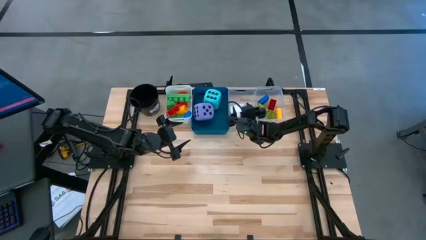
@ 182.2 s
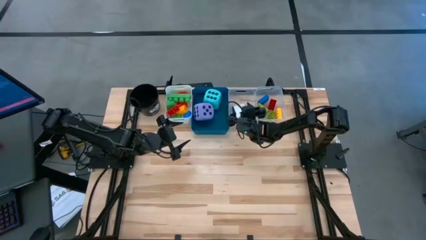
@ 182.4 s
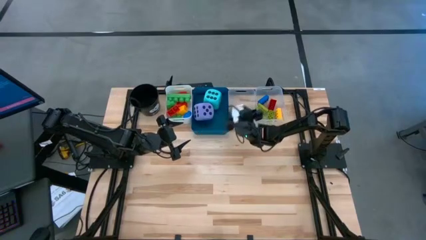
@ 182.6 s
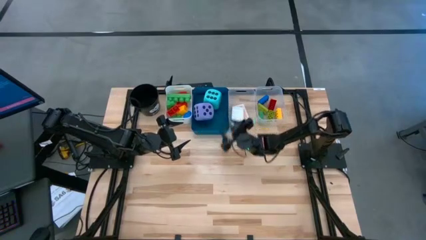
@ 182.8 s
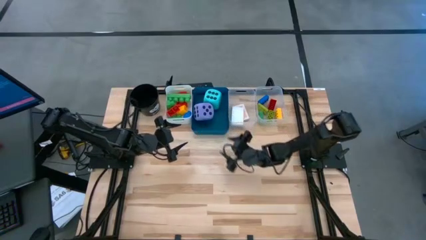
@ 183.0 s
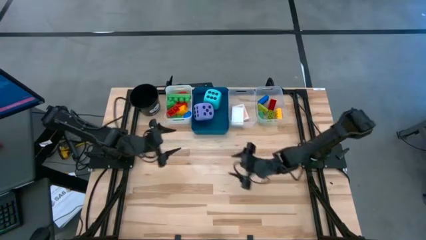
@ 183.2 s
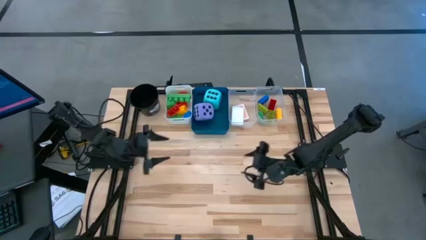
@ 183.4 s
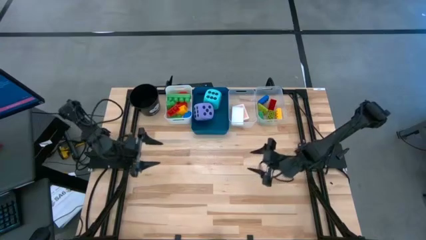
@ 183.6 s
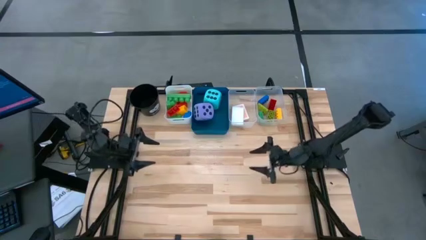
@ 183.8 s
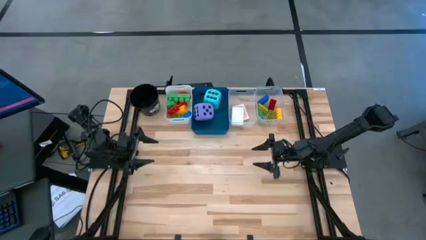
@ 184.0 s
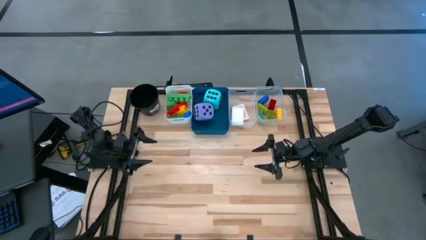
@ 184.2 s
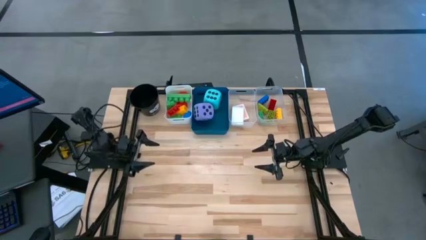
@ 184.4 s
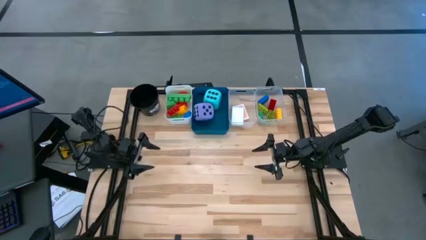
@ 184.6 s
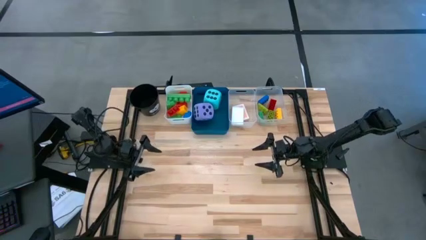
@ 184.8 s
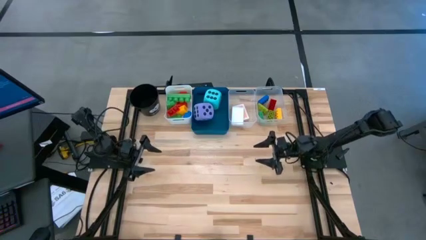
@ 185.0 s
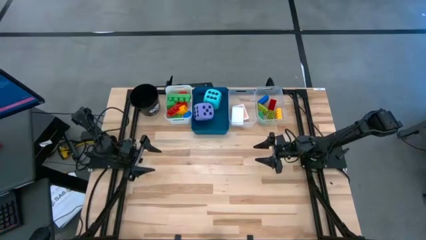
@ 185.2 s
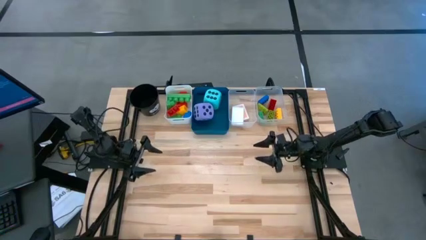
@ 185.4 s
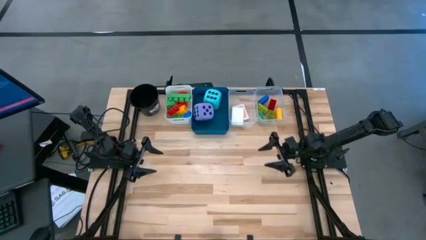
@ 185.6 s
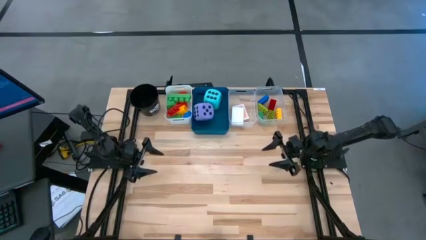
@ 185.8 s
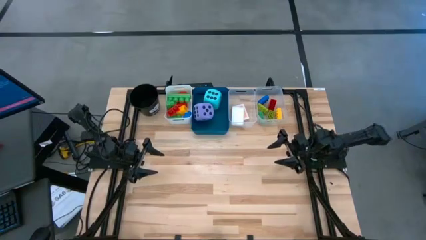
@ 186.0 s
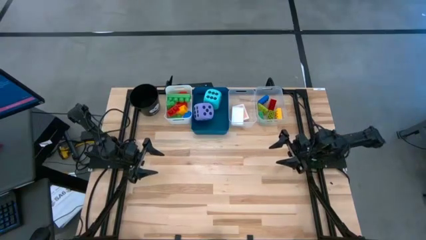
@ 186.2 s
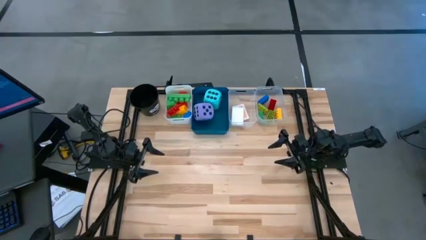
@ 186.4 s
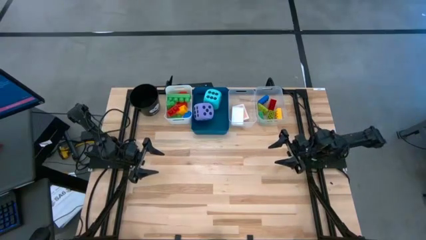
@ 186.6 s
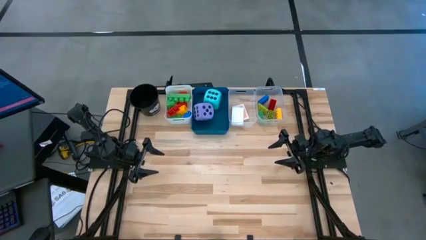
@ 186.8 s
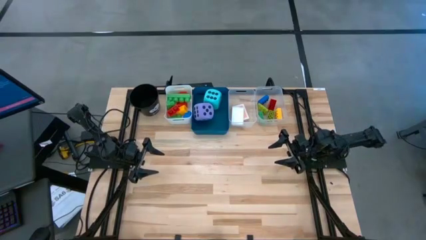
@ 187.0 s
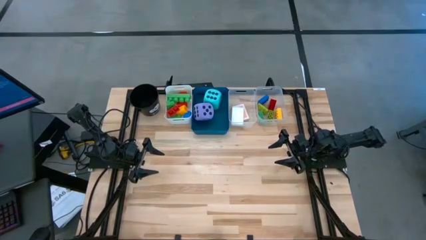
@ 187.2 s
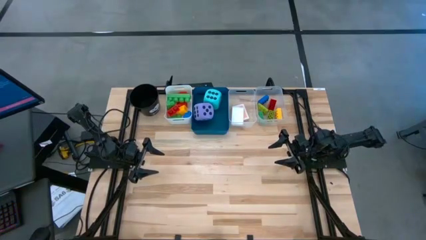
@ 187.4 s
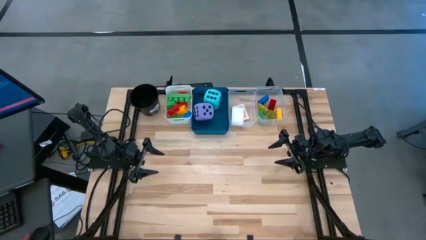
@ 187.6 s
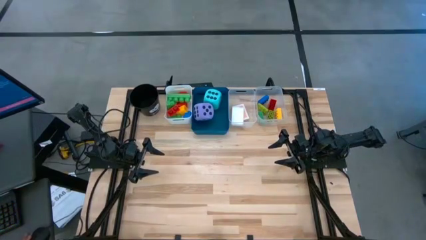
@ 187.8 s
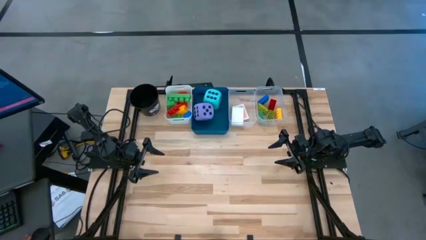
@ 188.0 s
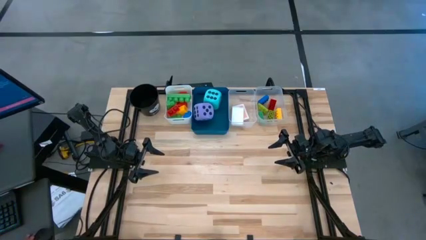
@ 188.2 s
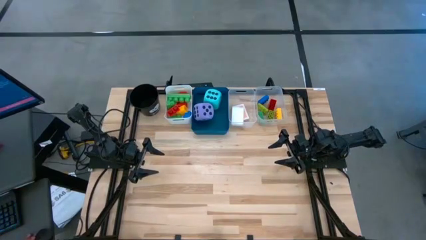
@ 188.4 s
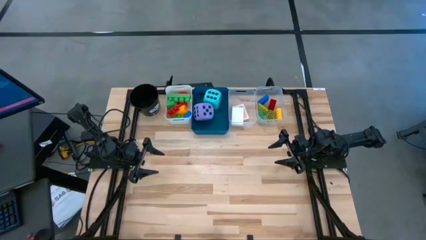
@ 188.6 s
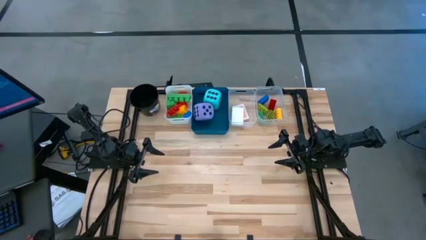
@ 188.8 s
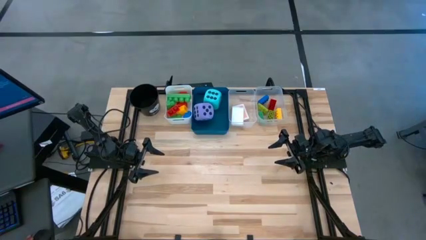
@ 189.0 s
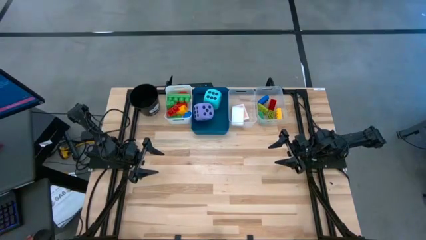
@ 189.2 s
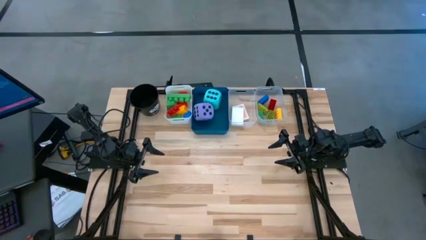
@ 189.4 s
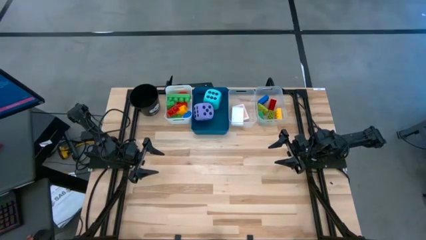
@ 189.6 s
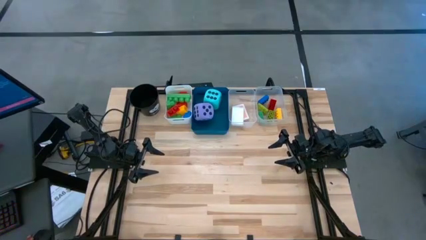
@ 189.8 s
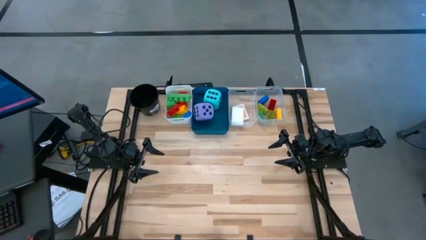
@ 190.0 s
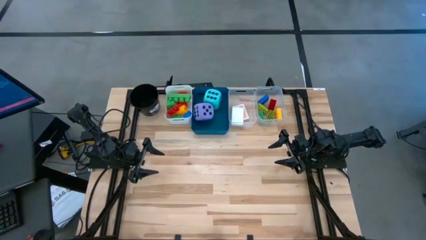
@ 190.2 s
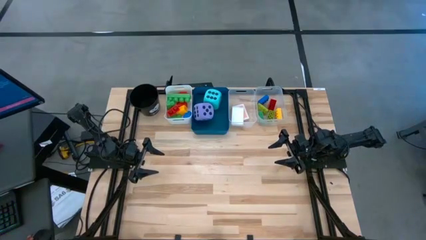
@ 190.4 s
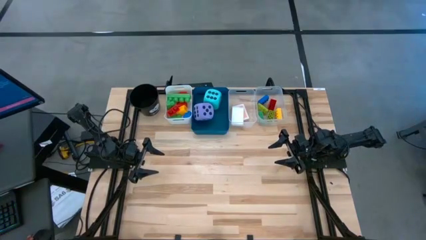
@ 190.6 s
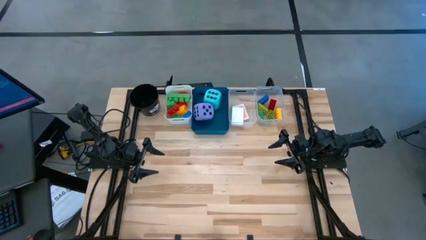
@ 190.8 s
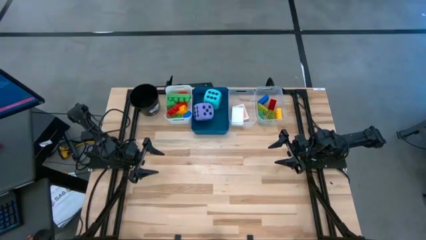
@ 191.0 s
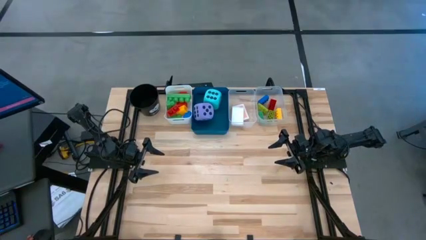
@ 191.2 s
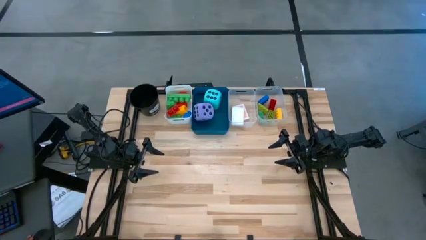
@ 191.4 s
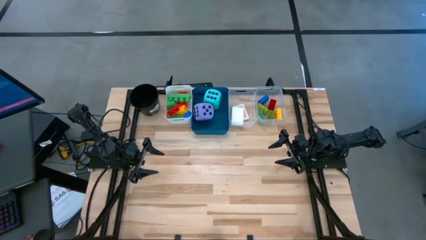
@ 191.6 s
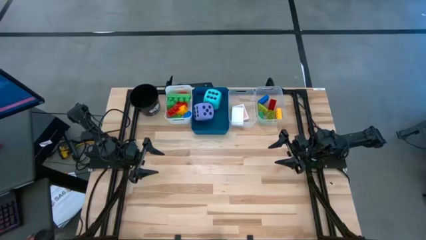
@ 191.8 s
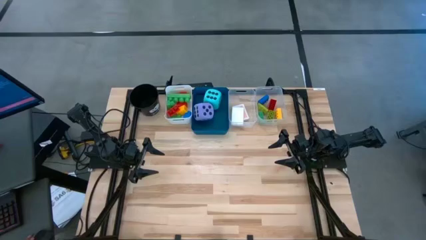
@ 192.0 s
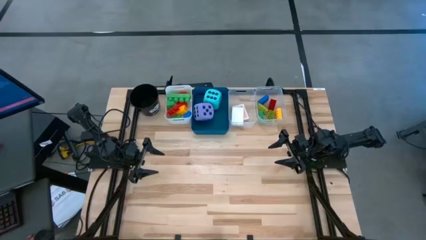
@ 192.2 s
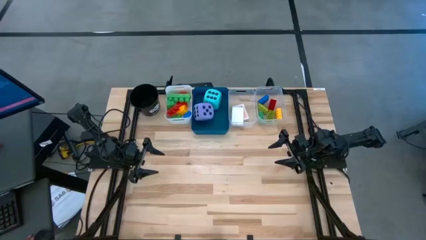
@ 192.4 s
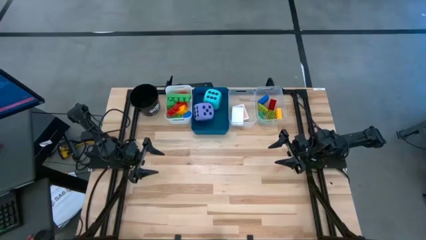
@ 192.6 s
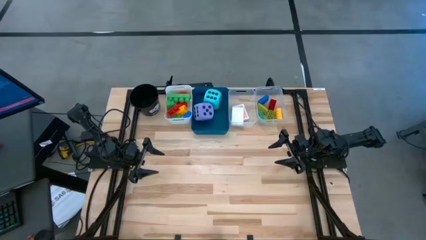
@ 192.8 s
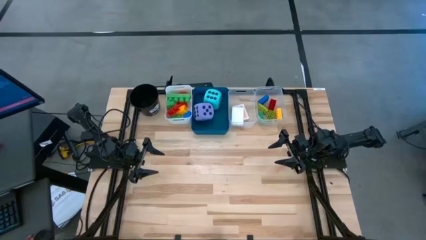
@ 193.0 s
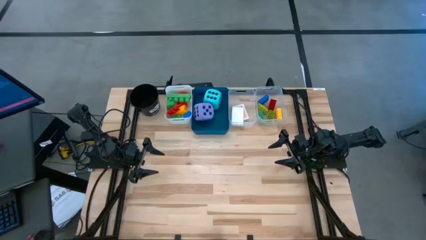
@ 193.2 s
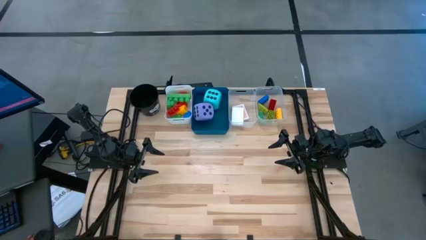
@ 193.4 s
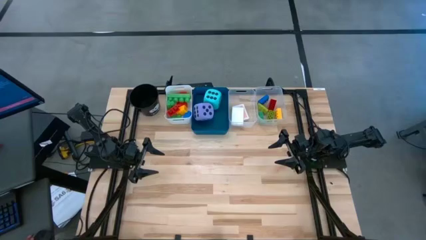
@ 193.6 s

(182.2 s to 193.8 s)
Task: Pick & Place Toys
Return to Home Position

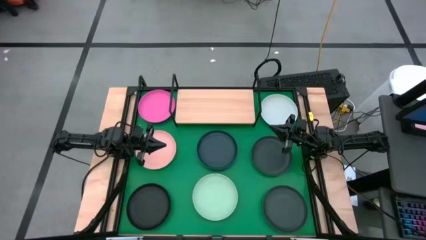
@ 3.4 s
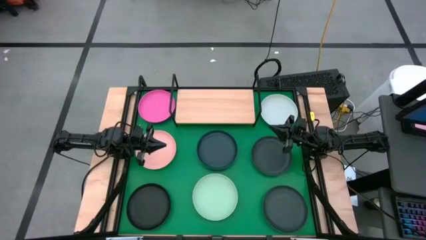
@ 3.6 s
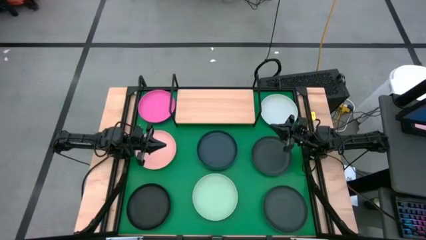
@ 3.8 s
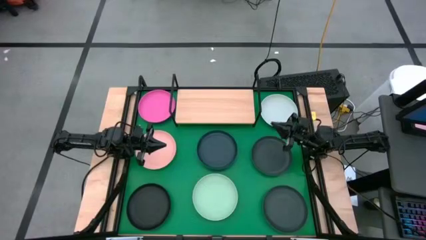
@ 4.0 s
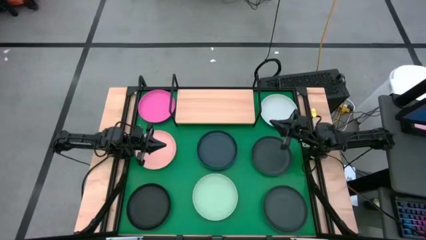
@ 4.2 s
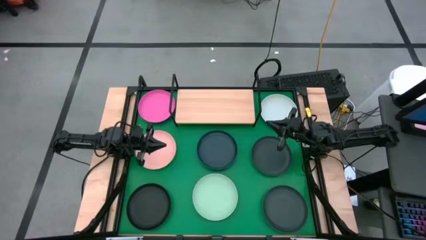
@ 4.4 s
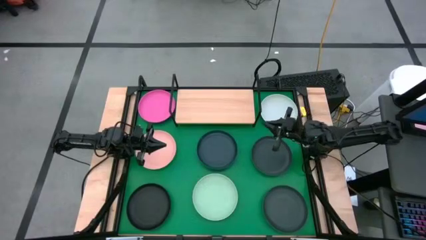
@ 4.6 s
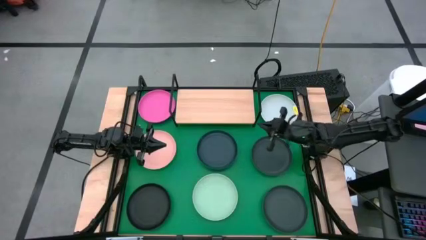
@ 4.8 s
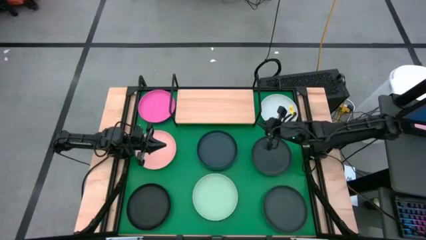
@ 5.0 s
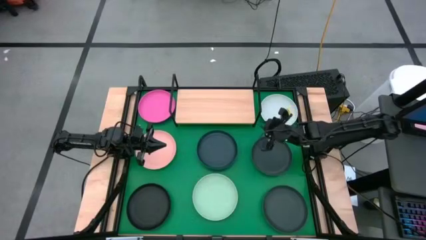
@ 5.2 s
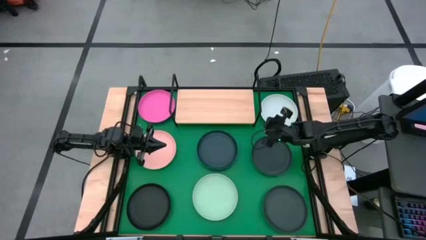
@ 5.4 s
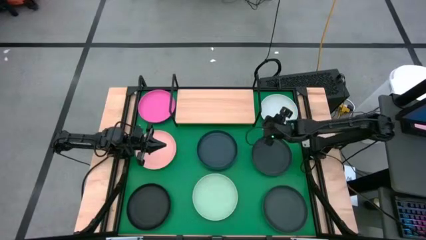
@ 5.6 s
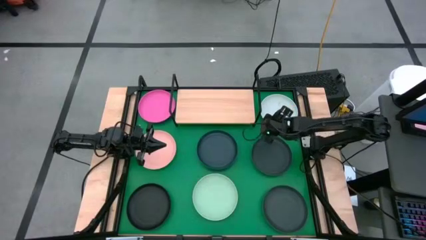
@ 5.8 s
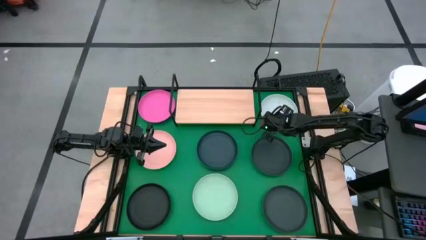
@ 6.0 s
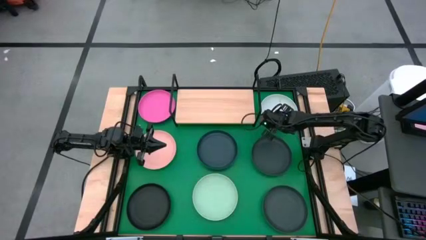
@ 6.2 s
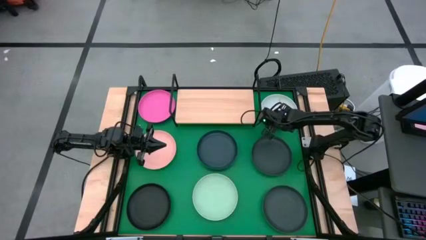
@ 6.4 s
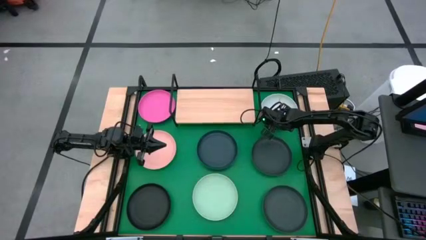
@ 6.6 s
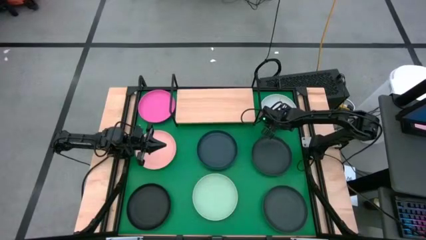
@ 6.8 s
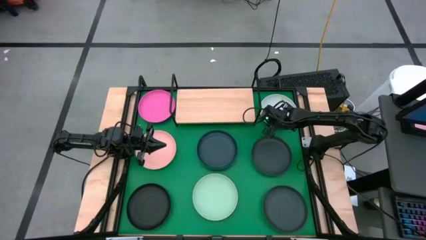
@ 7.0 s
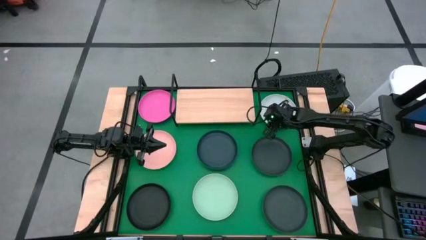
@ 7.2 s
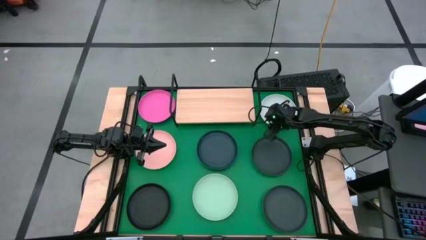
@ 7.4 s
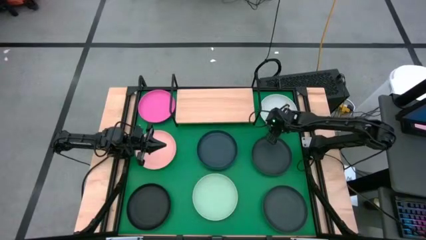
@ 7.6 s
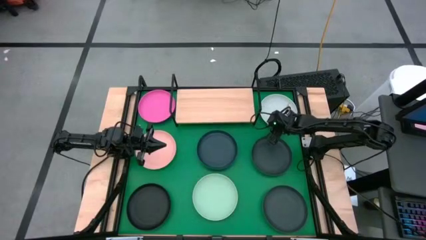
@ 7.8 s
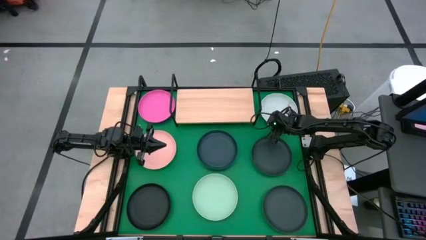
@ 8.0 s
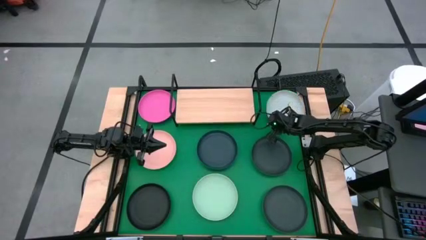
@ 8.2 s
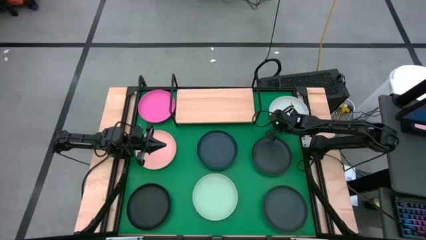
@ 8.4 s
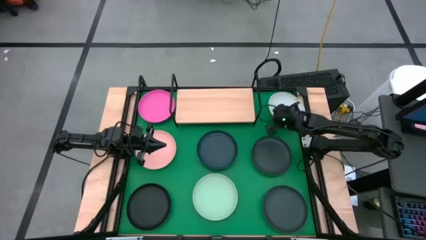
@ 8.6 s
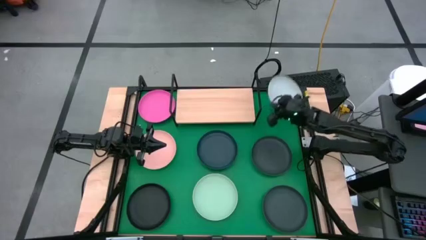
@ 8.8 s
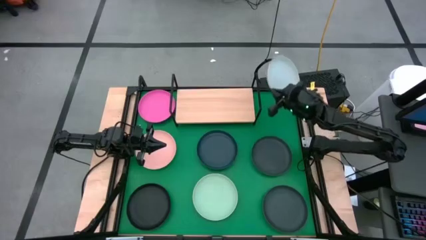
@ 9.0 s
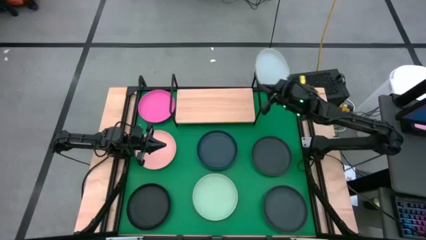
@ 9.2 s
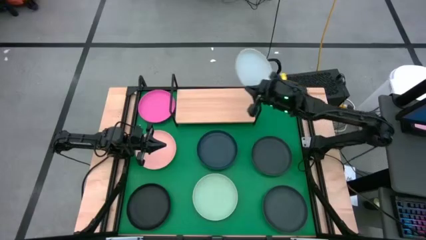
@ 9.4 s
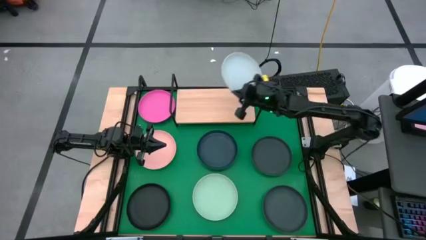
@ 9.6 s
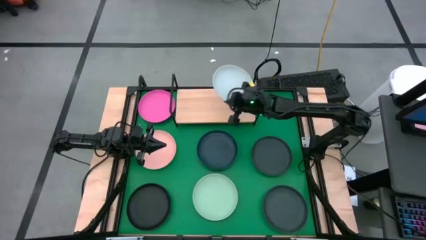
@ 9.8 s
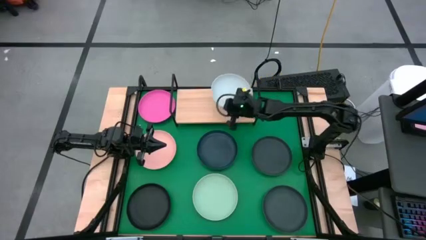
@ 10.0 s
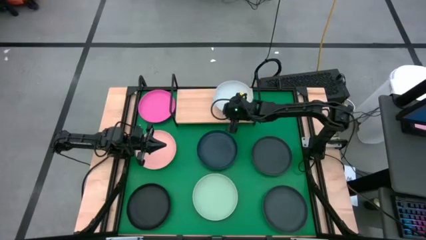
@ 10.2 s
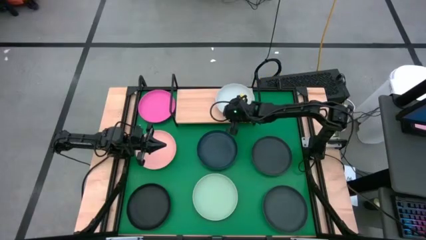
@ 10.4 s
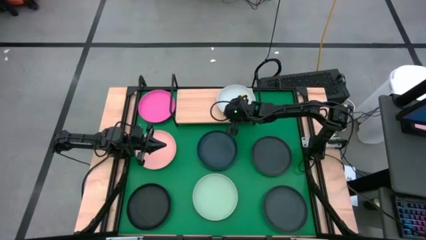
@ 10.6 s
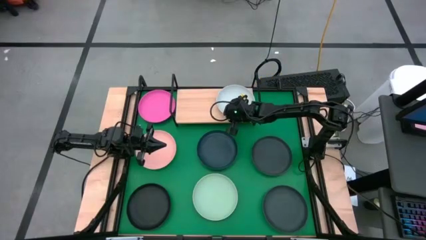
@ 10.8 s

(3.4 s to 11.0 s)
Task: Place and stack plates onto a shelf
Put the white plate on the shelf
